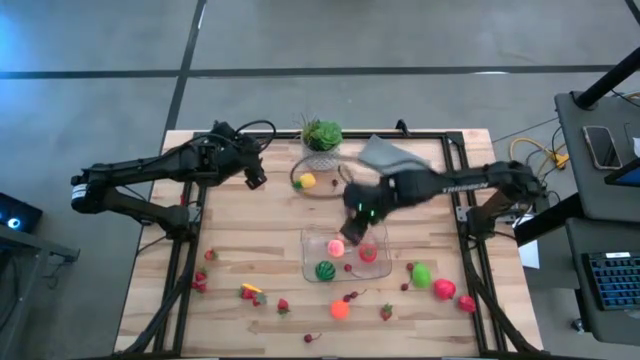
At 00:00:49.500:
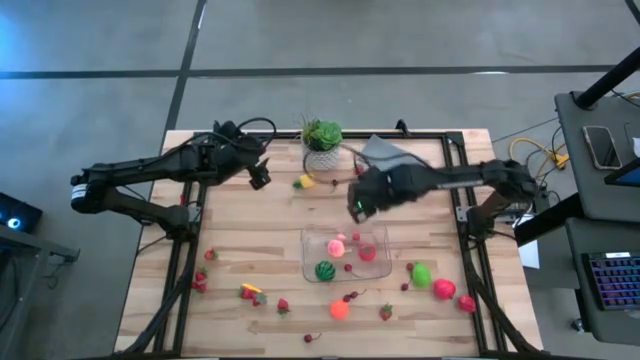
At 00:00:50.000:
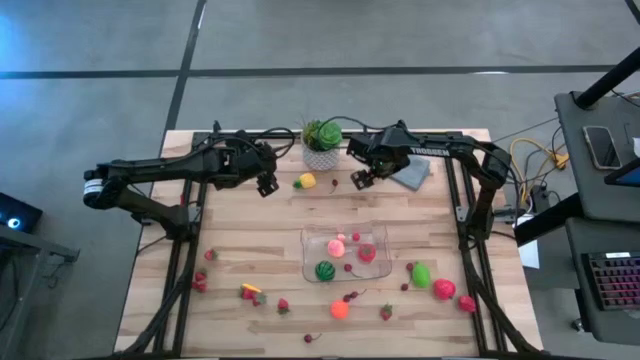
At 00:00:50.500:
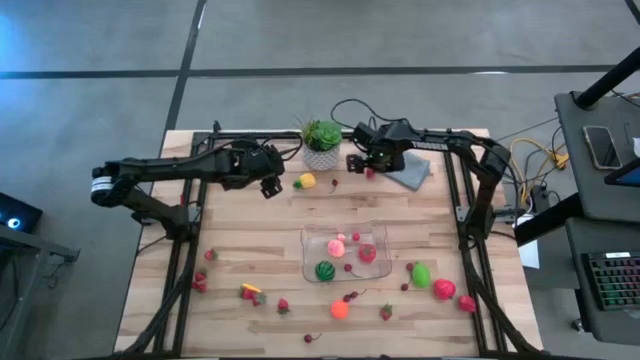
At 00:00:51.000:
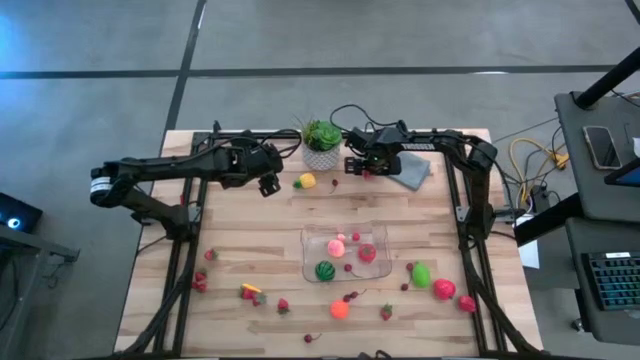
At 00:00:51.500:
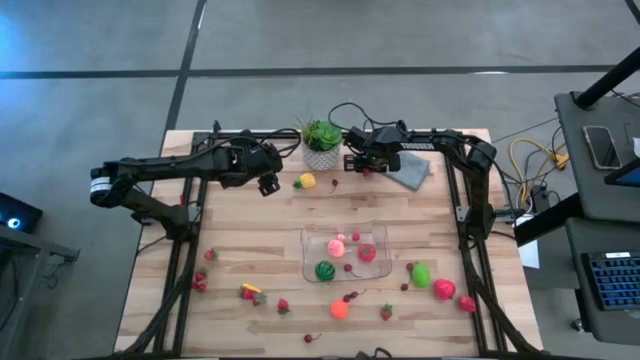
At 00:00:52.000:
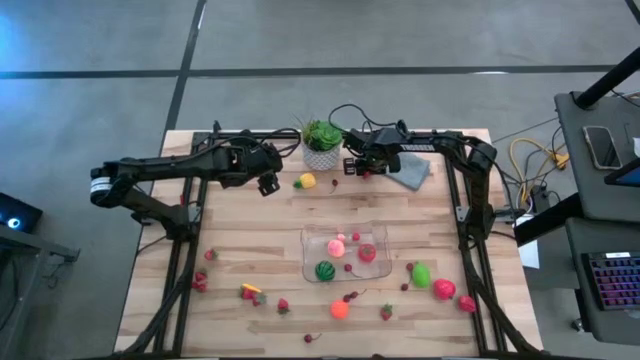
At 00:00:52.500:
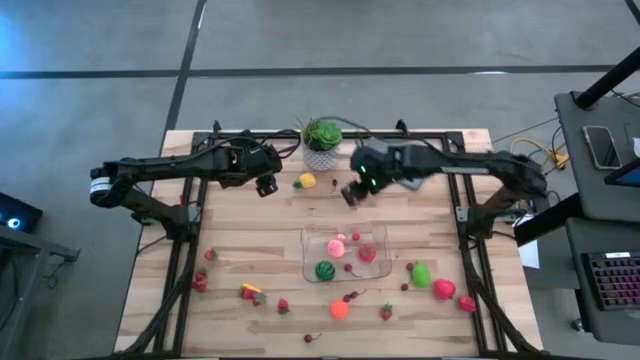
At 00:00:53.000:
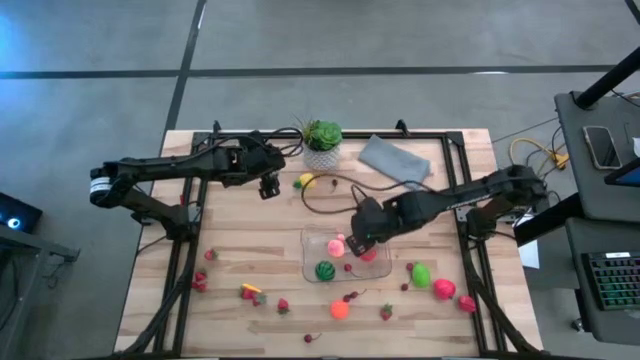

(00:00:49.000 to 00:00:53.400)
Task: Pick and placing Produce into tupperware
Put the strawberry into the transparent bin

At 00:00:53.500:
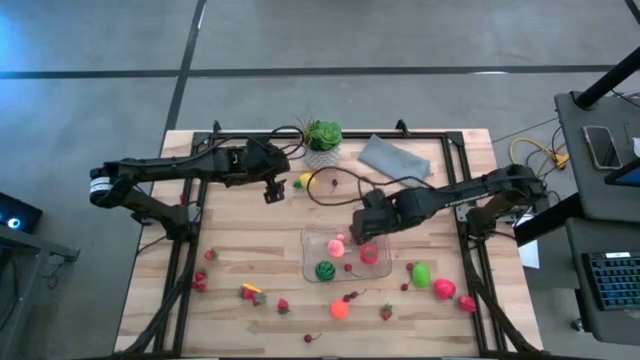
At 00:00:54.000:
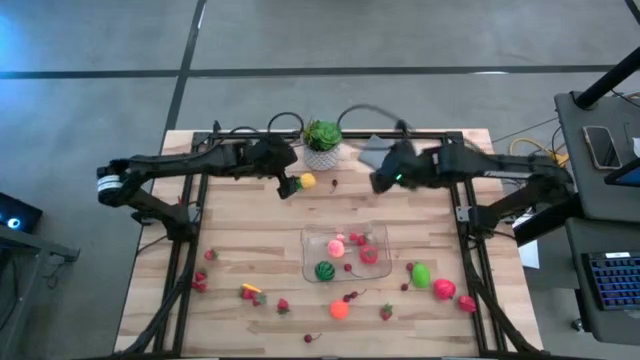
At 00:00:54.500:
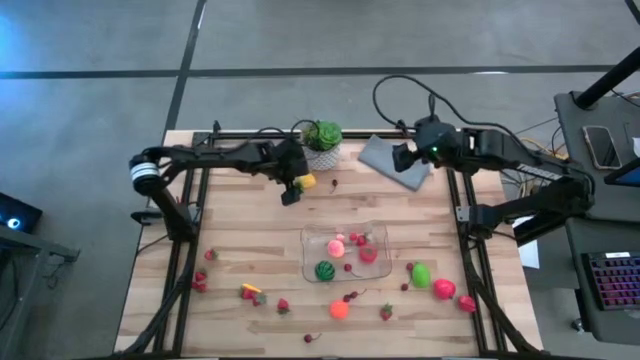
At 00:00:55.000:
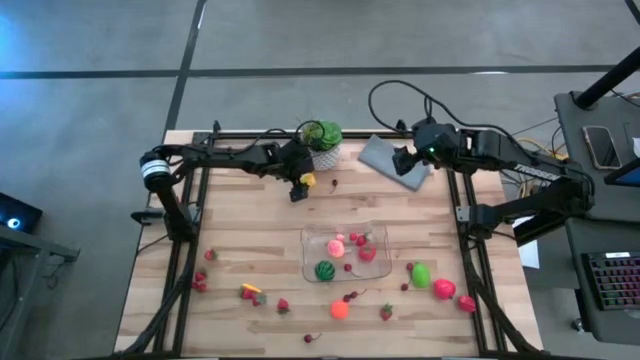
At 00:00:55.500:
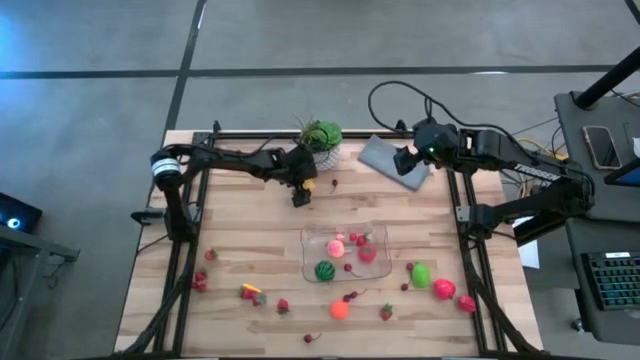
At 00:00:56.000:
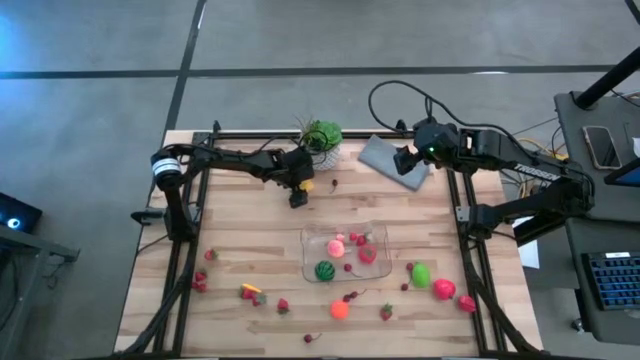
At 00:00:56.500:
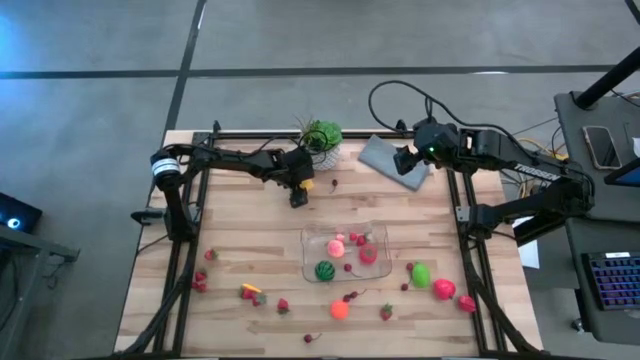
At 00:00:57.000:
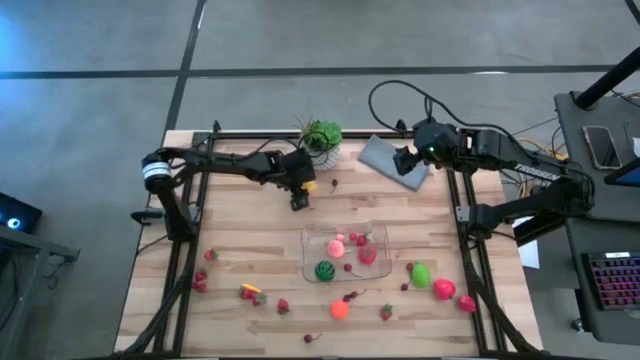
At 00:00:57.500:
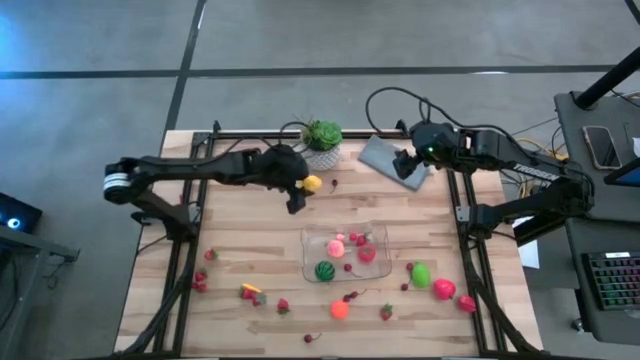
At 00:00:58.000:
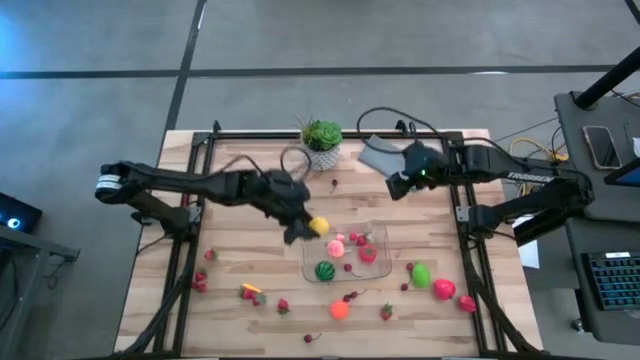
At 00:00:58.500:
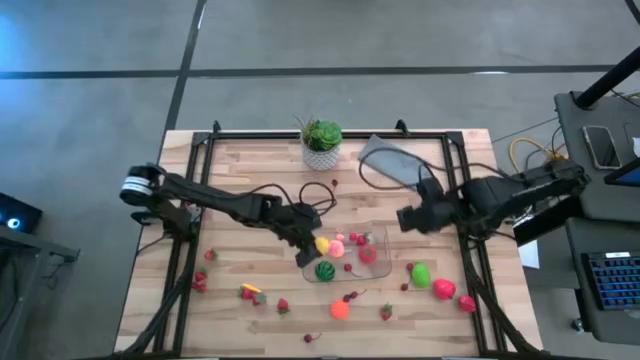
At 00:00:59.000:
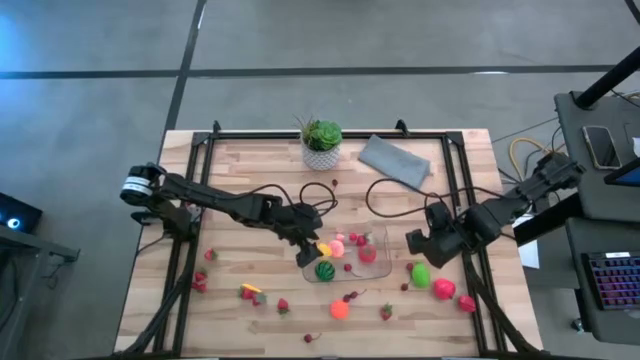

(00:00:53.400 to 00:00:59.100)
Put the pineapple into the transparent bin

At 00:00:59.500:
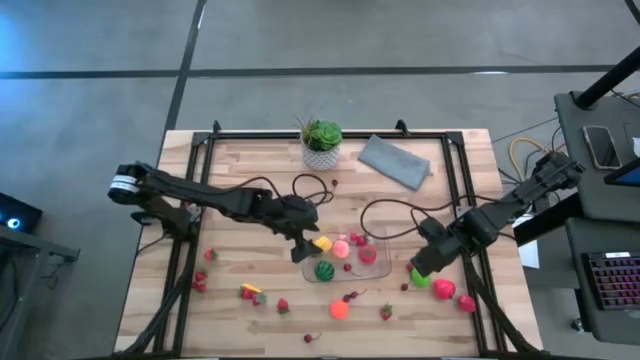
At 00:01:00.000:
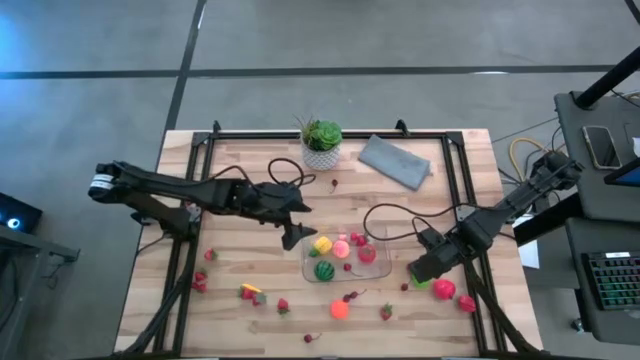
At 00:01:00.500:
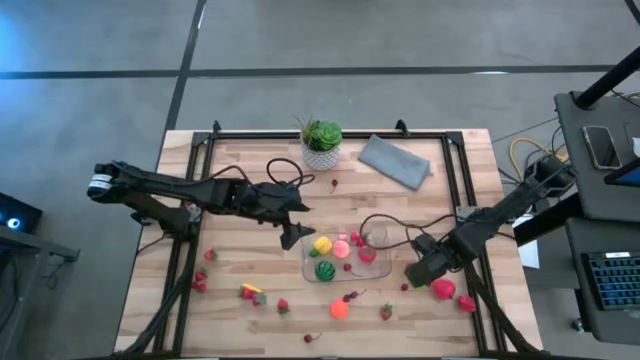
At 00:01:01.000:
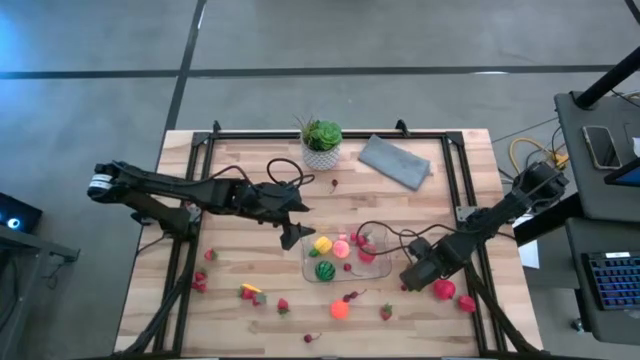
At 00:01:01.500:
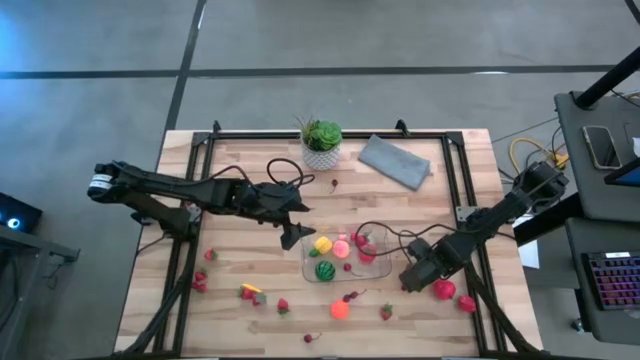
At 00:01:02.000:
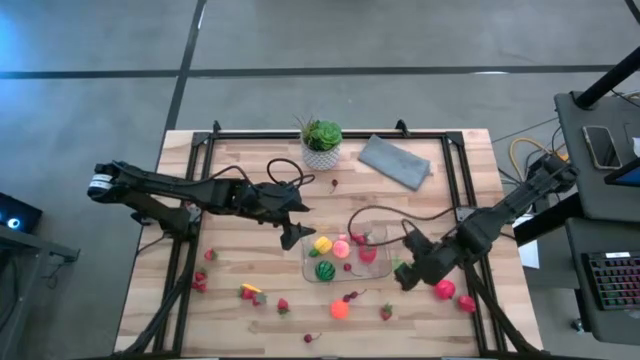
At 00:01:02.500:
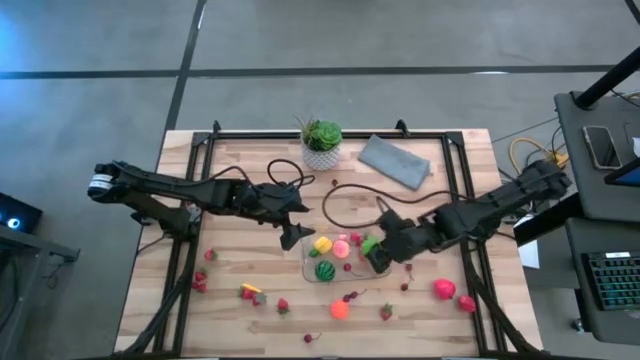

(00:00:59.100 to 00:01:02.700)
Put the melon into the transparent bin

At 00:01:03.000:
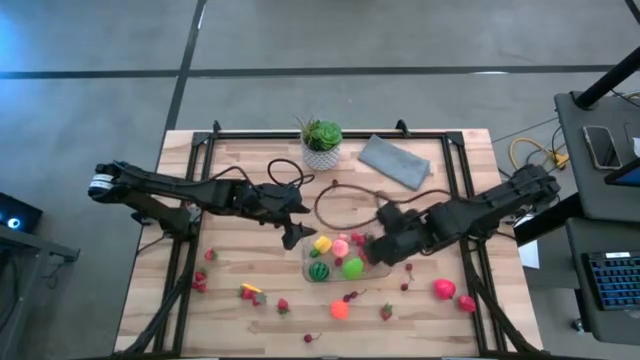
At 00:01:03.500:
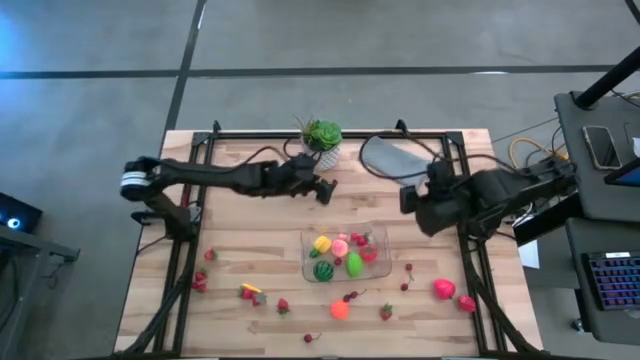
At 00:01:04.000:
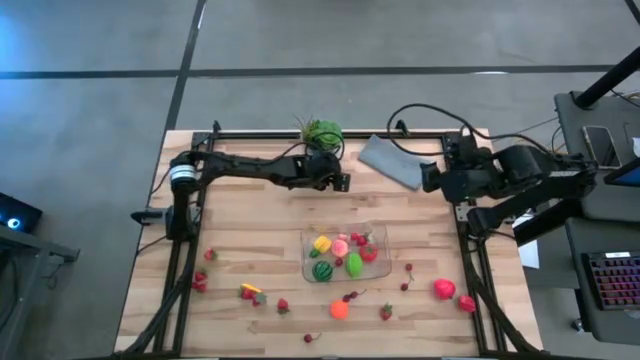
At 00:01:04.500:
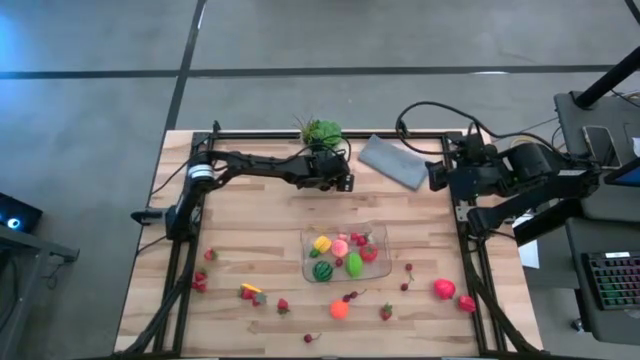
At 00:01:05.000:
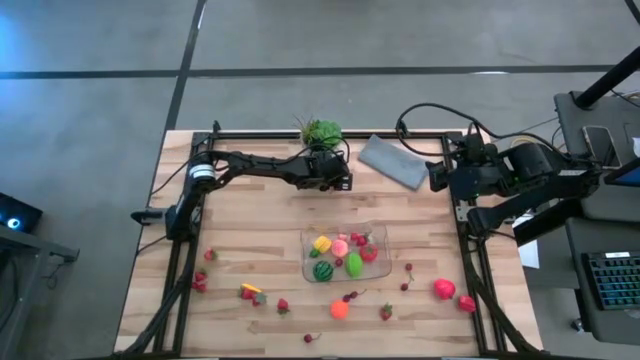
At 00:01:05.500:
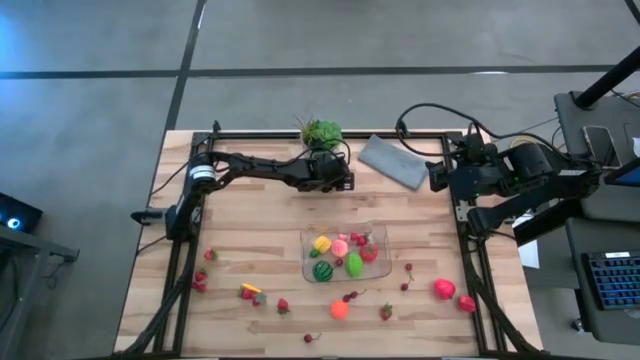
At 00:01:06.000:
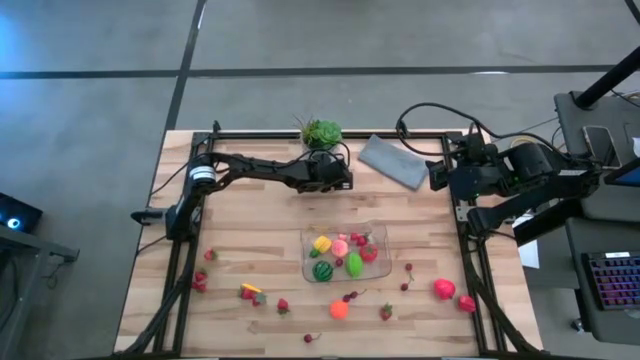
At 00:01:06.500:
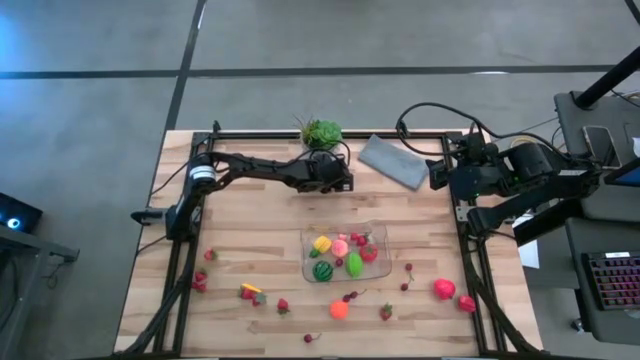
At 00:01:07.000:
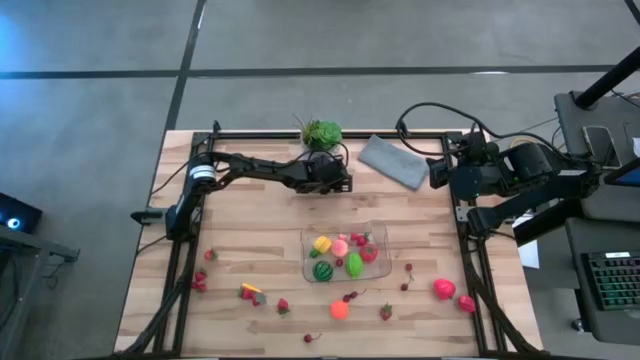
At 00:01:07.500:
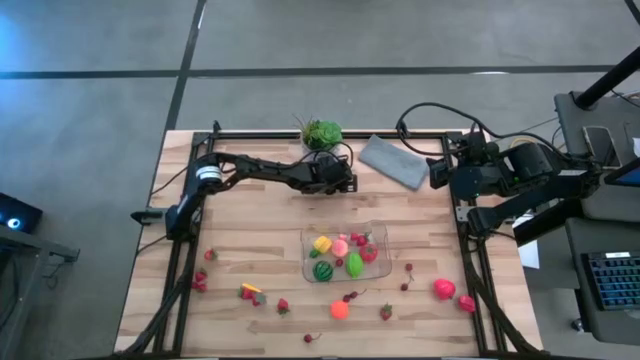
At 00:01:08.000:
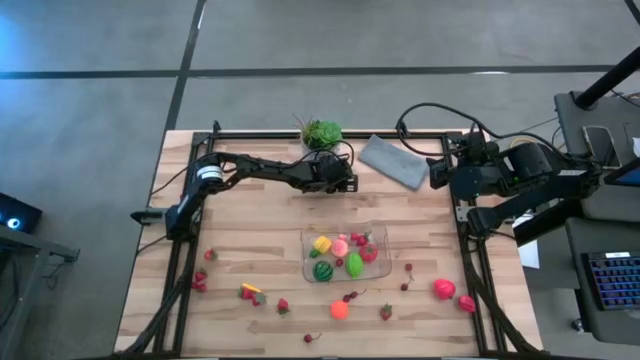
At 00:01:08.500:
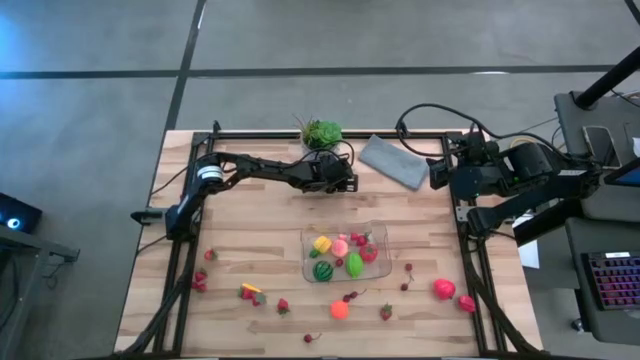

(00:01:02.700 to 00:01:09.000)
Put the cherry into the transparent bin

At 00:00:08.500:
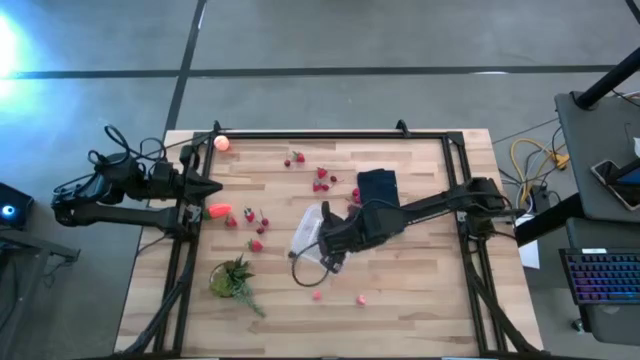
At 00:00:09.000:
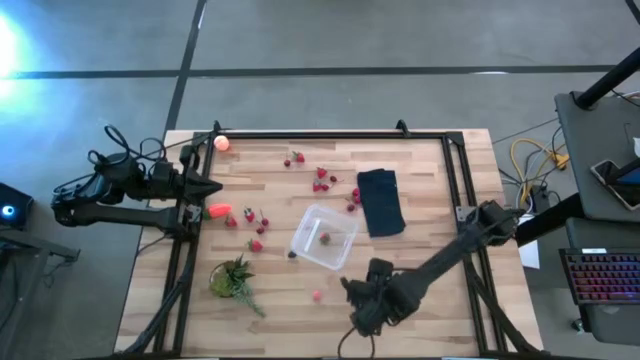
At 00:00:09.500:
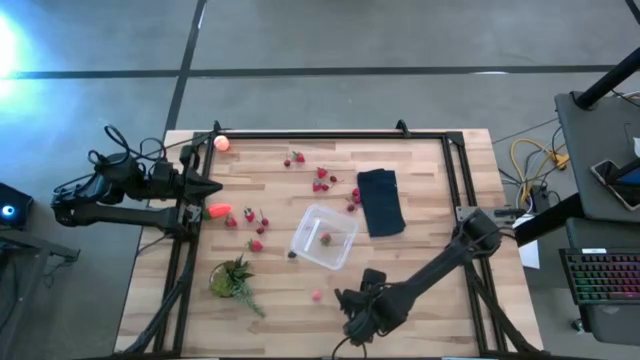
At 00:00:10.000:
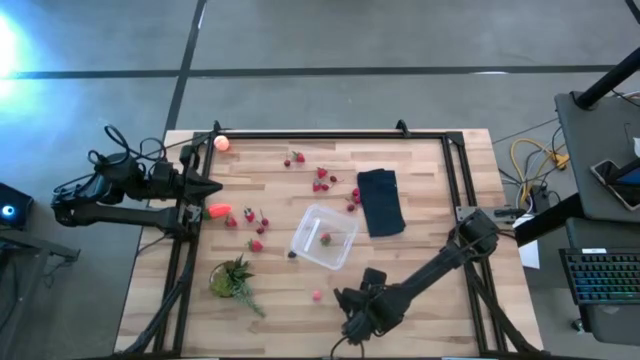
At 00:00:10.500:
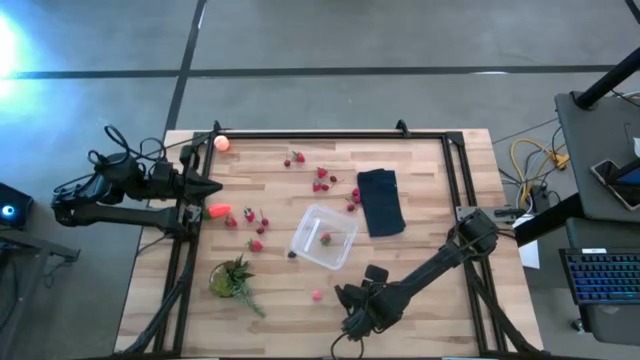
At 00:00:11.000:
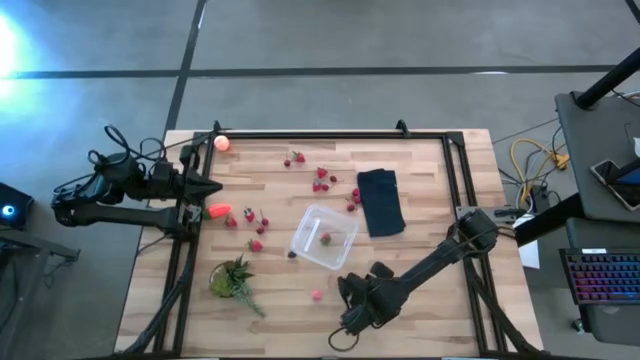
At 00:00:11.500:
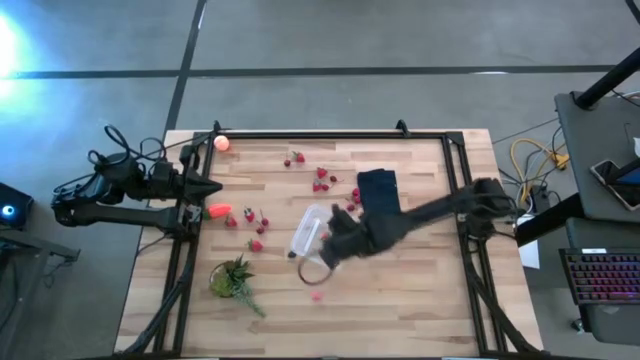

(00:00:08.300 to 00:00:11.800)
Task: Pick and placing Produce into tupperware
Put the pink peach into the transparent bin
